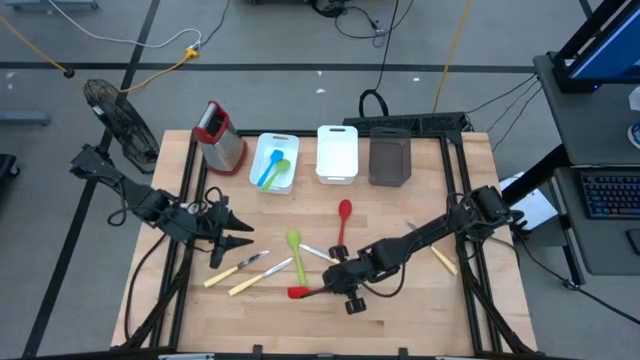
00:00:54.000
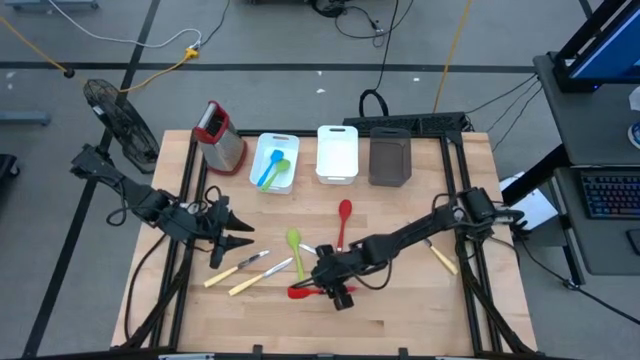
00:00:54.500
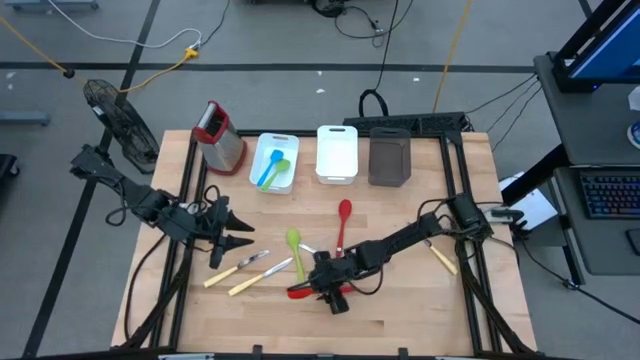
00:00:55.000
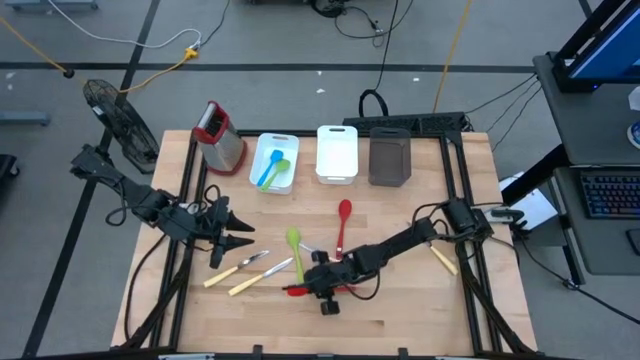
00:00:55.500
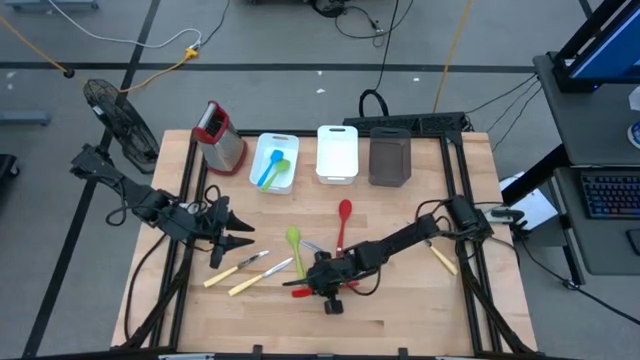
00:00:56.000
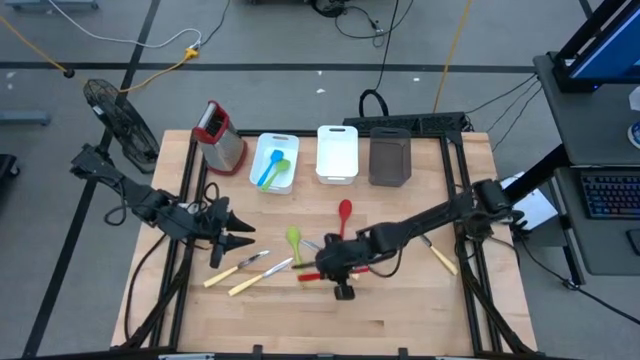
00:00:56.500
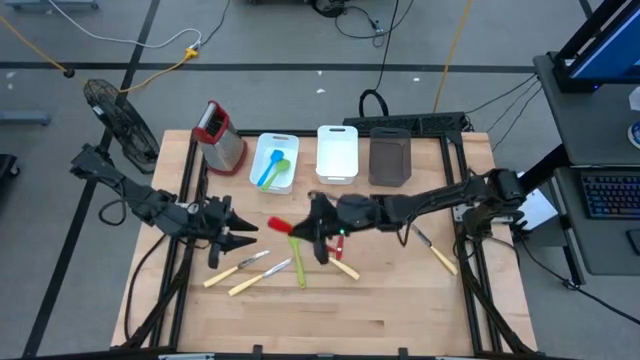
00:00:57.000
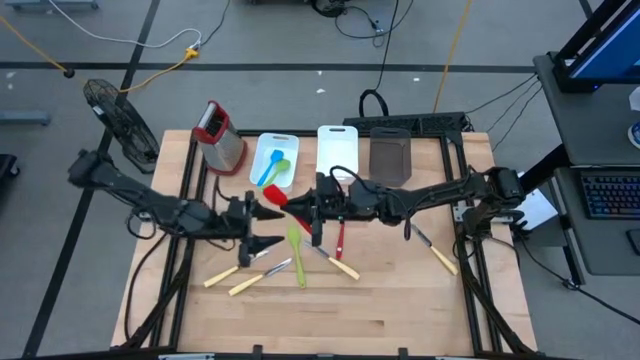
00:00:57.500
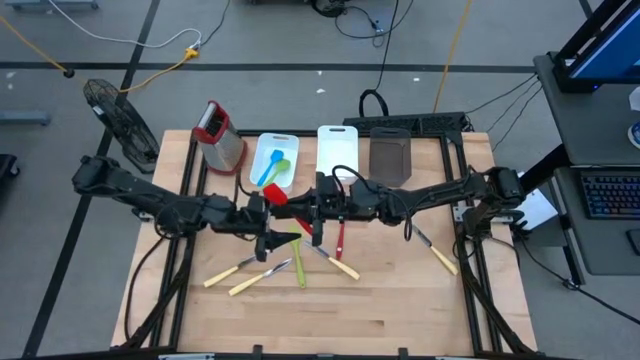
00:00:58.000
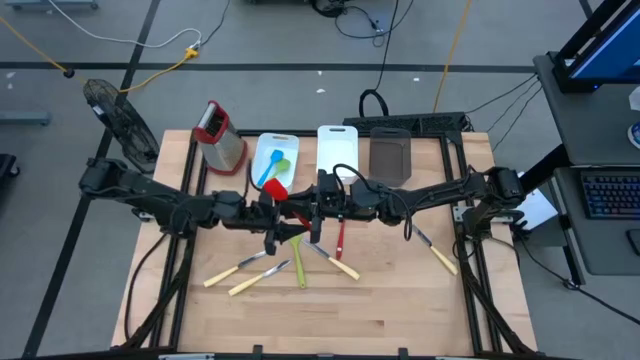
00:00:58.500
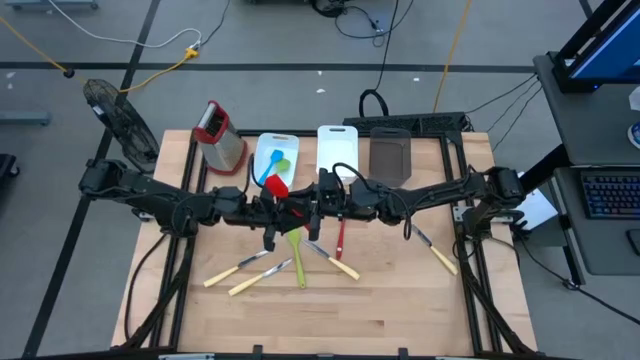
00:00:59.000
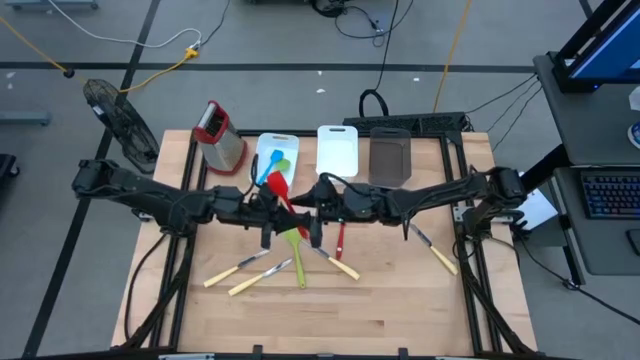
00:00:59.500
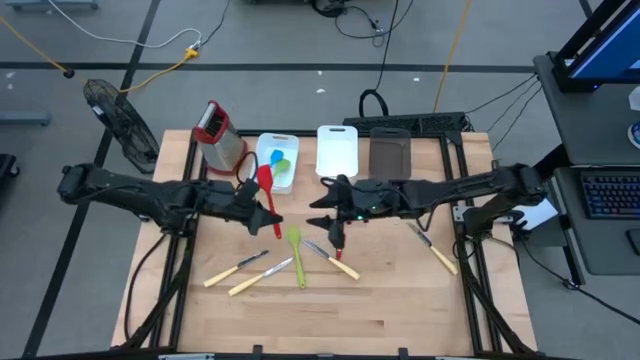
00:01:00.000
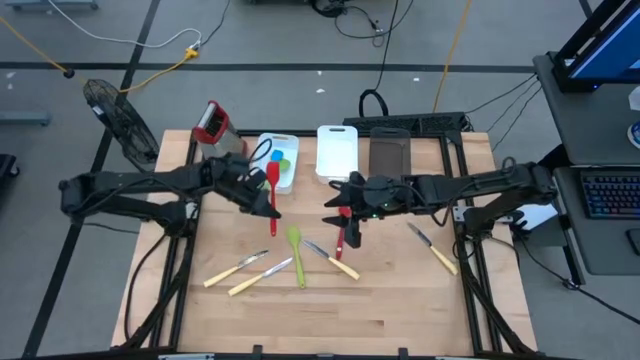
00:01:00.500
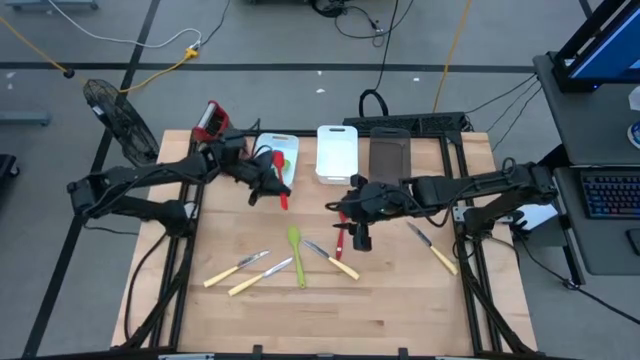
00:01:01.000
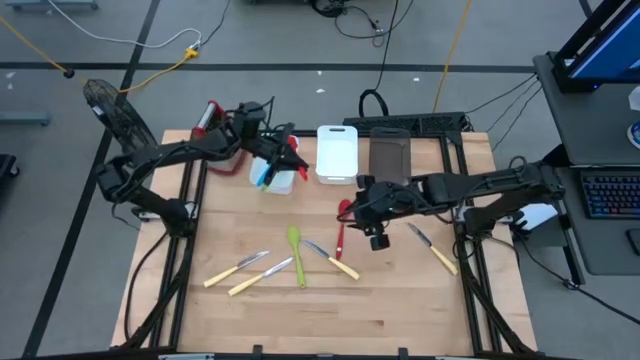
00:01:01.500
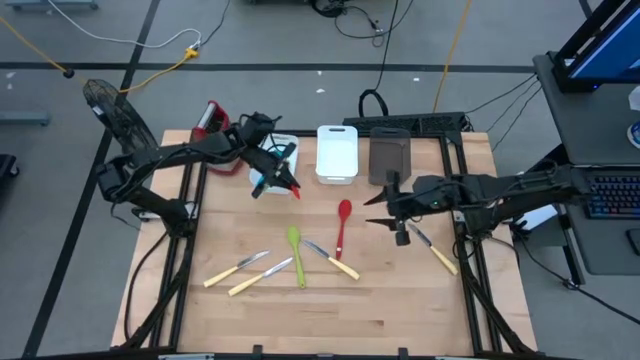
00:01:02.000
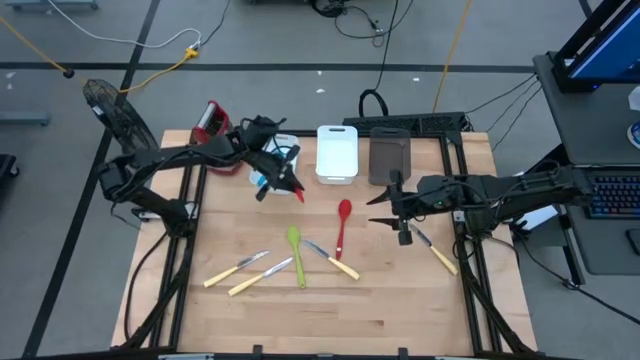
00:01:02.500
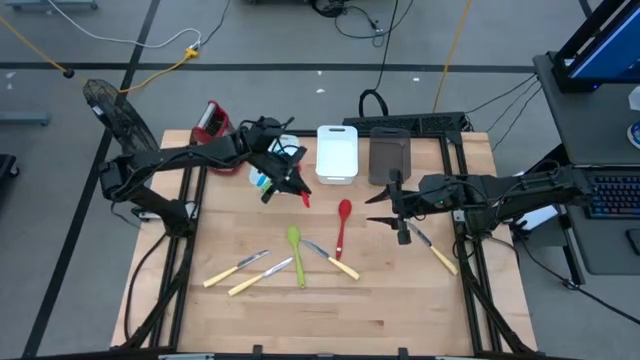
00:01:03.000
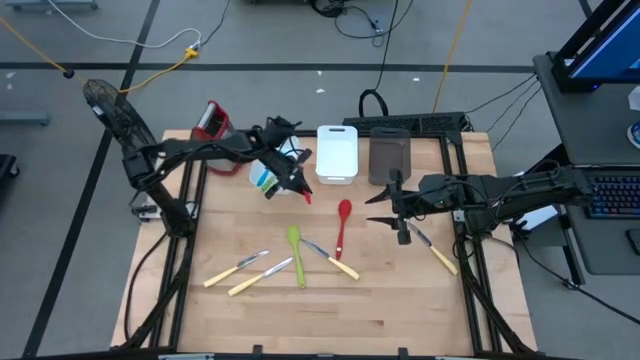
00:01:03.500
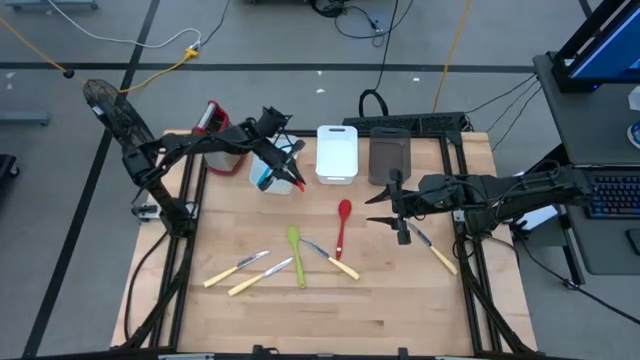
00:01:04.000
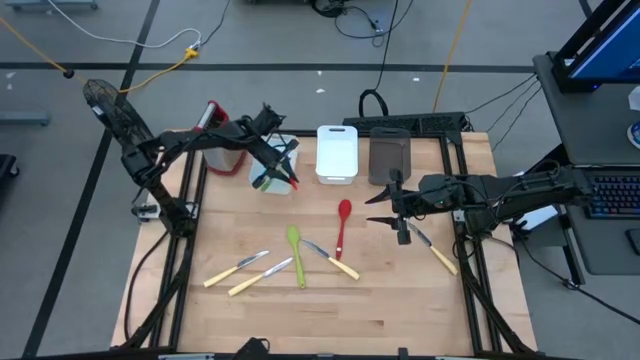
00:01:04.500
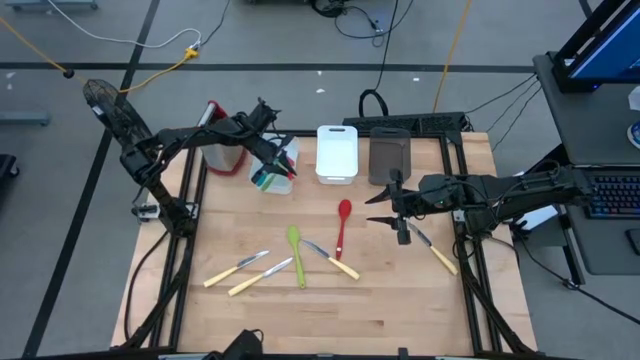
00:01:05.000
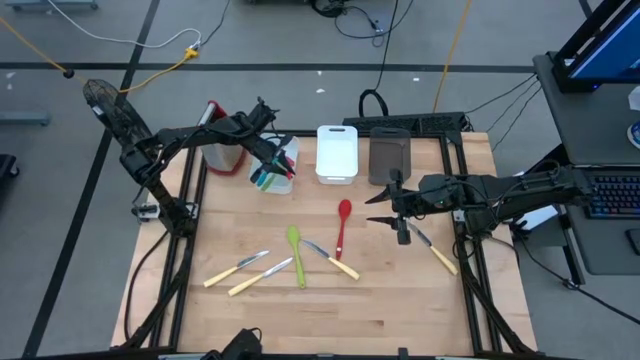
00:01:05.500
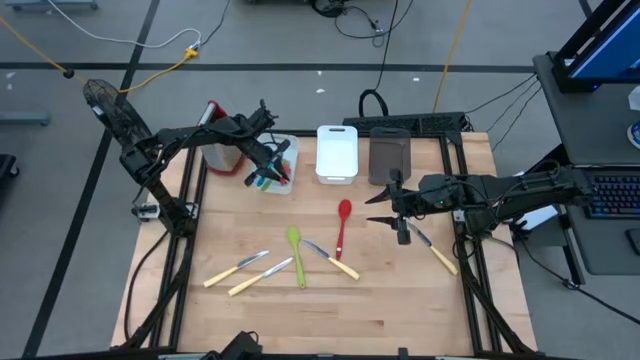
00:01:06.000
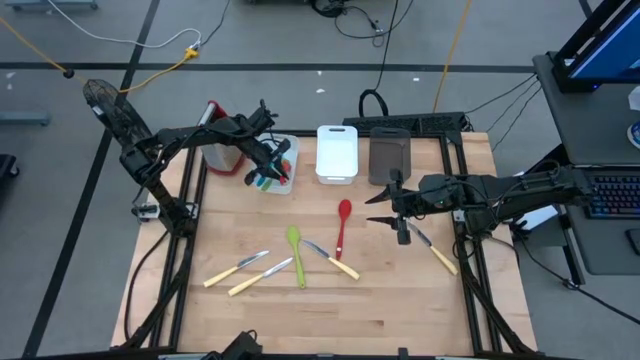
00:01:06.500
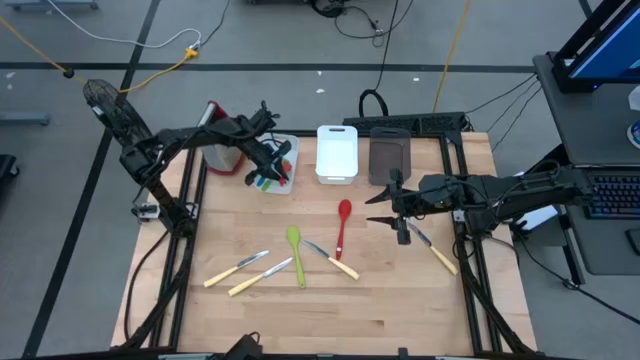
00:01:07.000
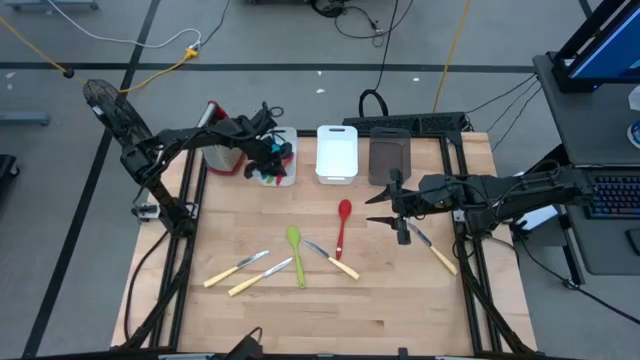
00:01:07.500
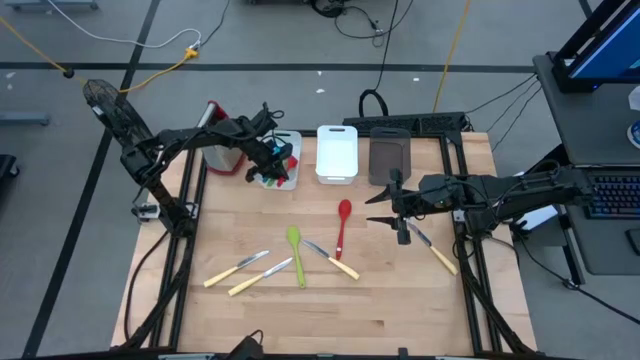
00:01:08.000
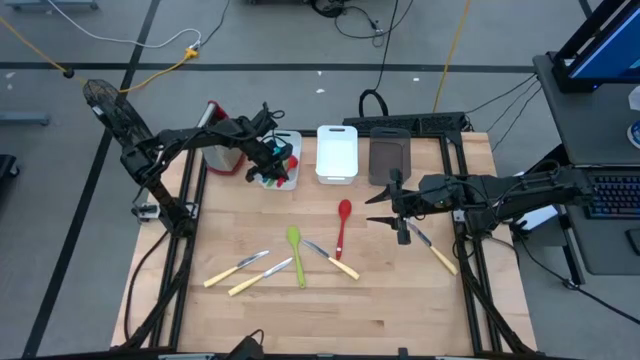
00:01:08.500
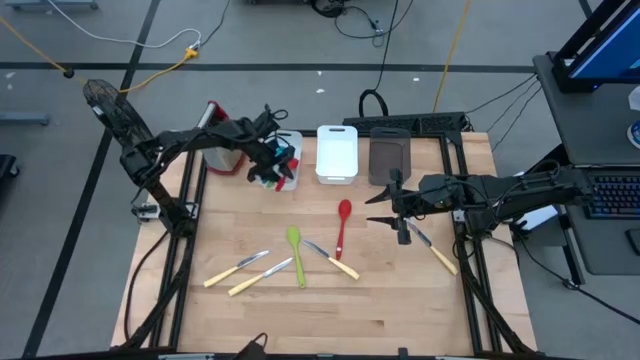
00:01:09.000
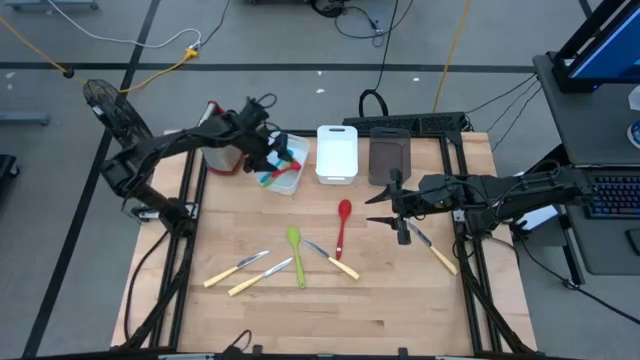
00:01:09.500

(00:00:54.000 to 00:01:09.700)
Task: Pick & Place Kitchen Items
Put the red spatula into the left white bin

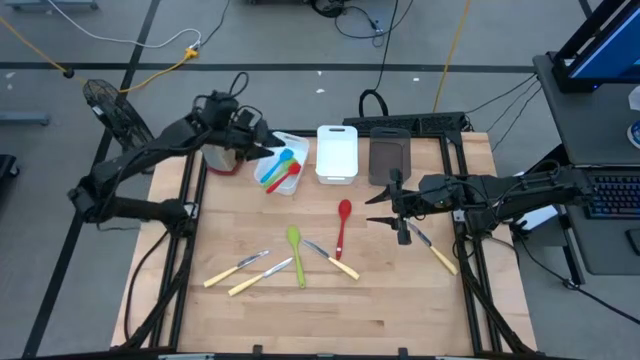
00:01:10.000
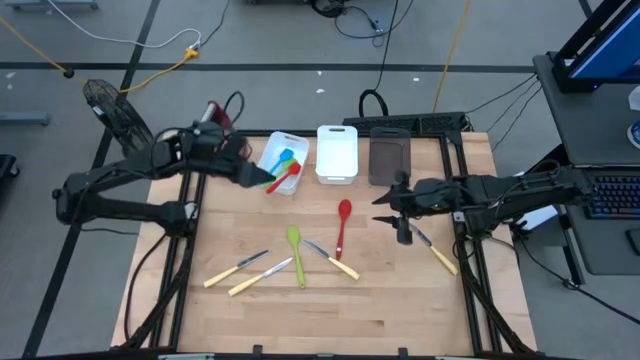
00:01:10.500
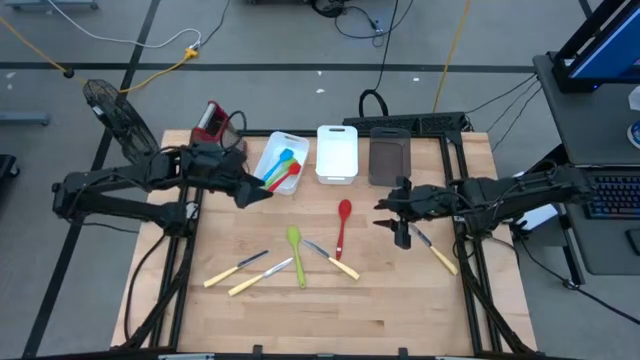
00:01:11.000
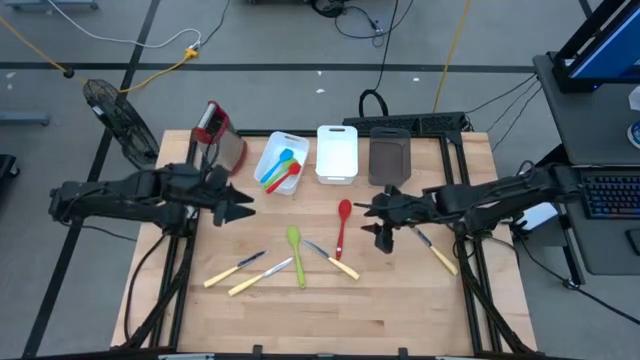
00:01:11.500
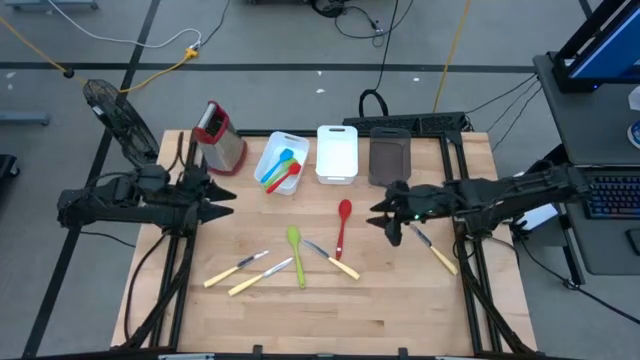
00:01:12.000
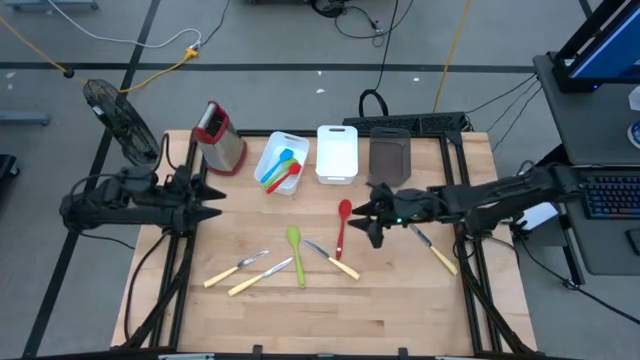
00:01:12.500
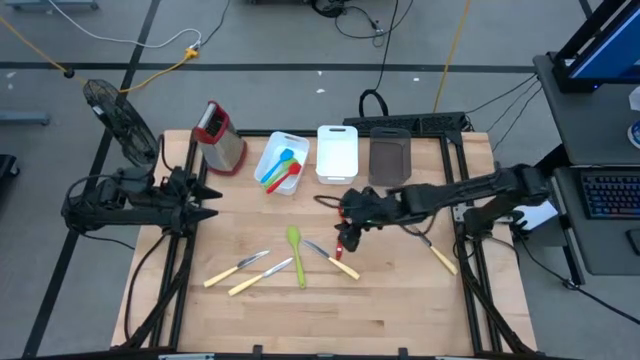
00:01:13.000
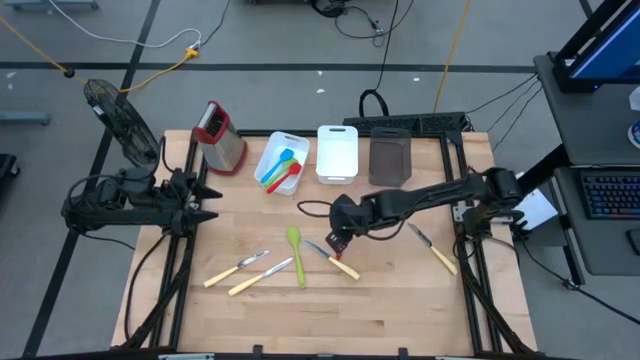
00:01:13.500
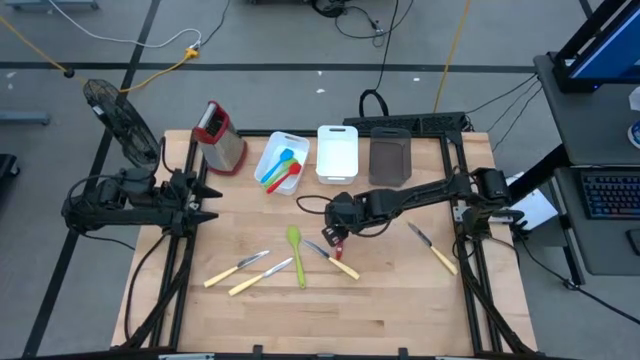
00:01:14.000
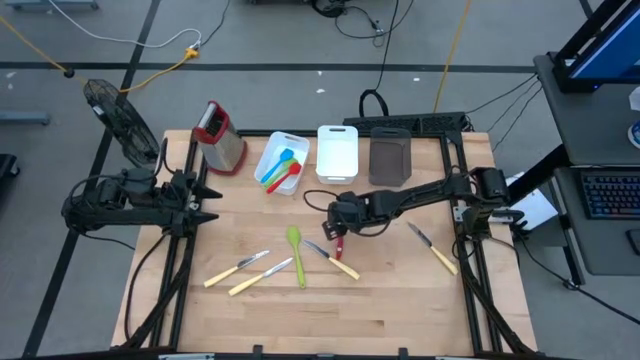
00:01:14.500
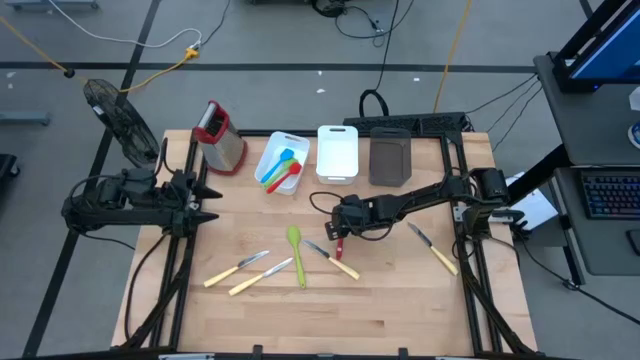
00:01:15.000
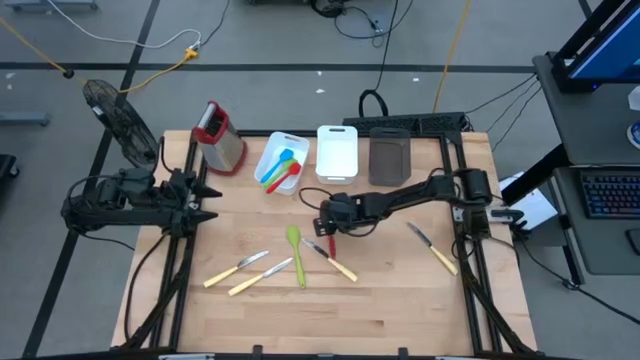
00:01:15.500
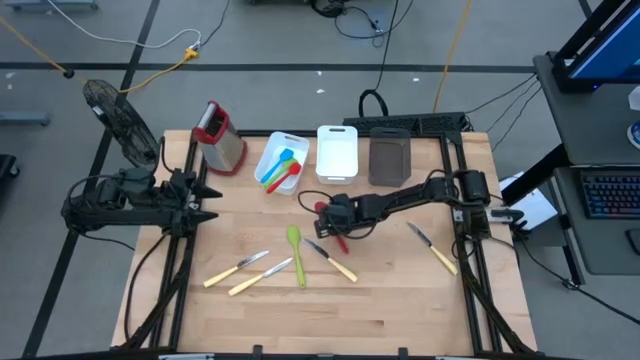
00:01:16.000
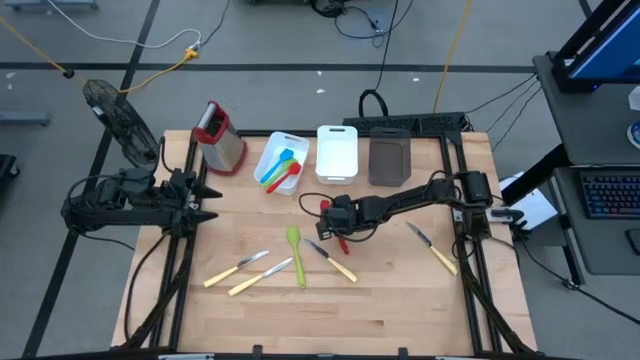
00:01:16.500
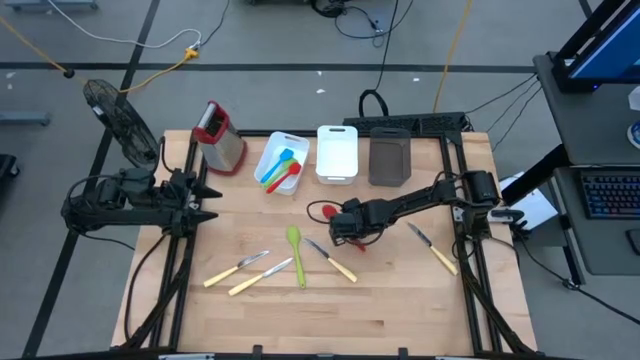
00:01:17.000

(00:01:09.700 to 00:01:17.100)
Put the red serving spoon into the black bin
